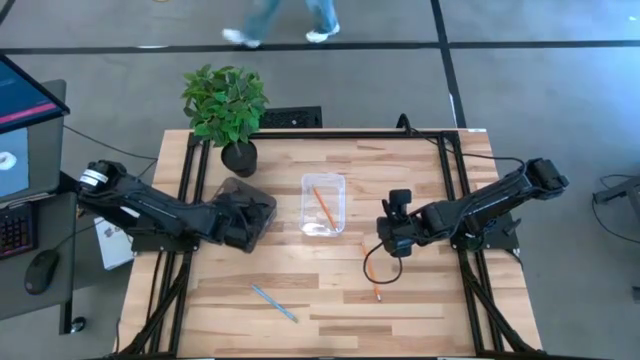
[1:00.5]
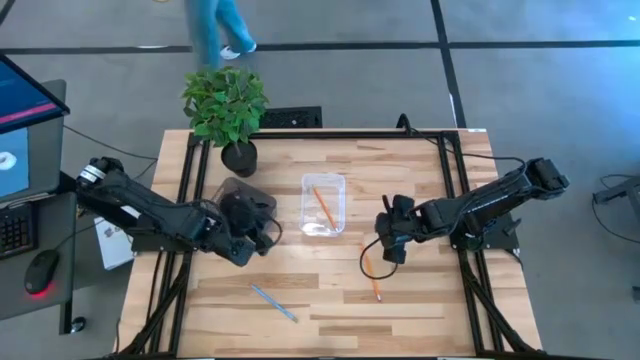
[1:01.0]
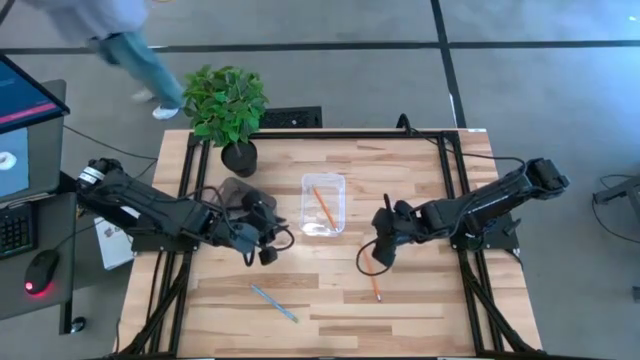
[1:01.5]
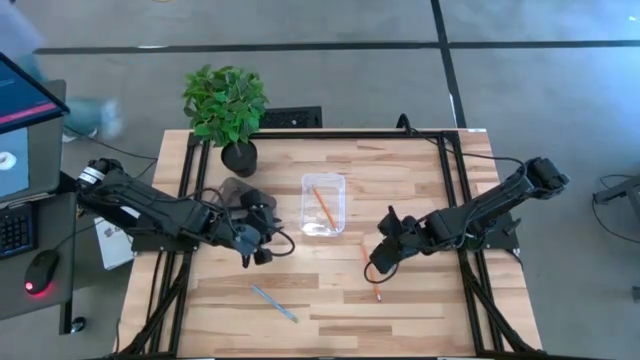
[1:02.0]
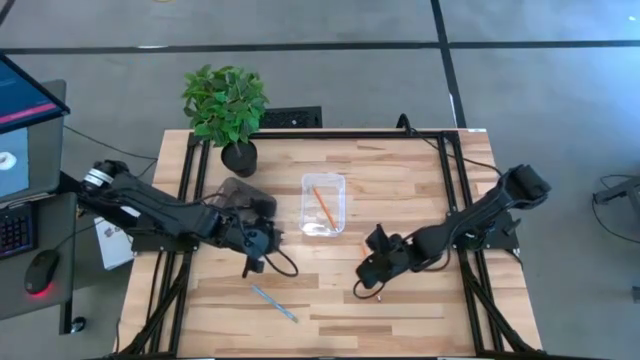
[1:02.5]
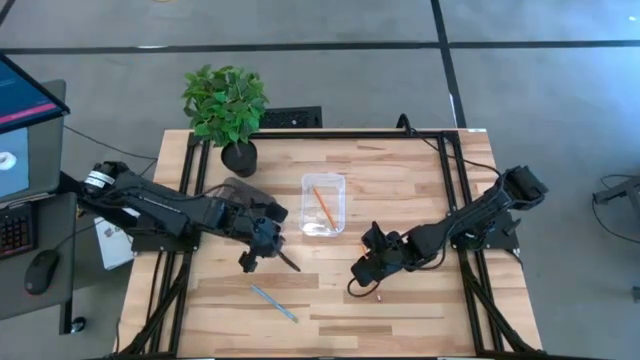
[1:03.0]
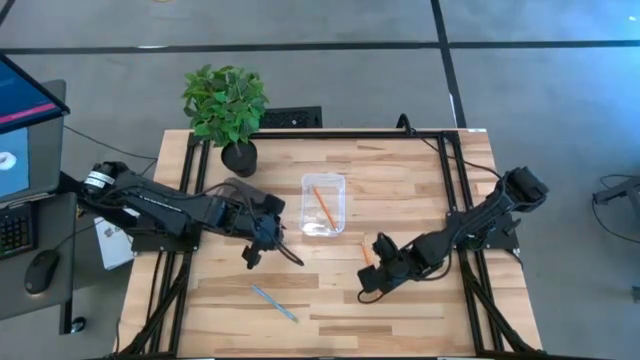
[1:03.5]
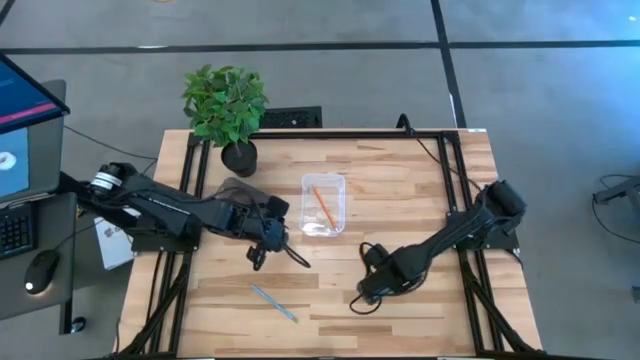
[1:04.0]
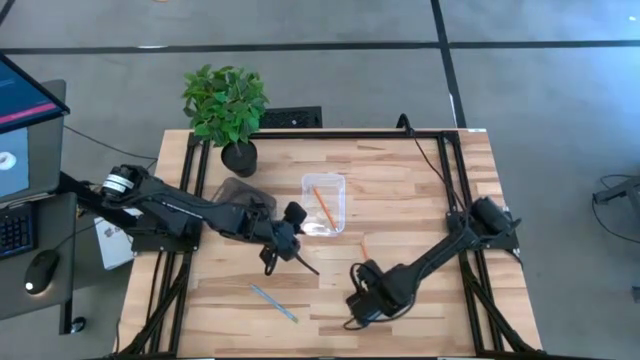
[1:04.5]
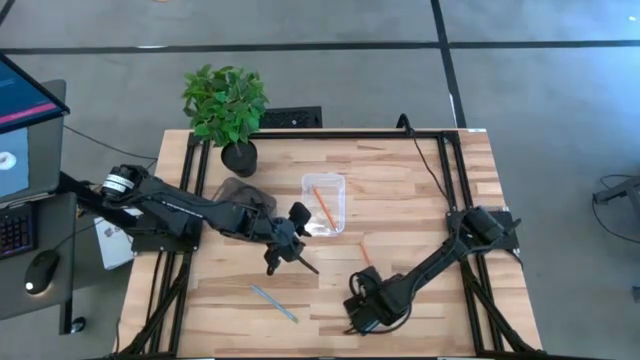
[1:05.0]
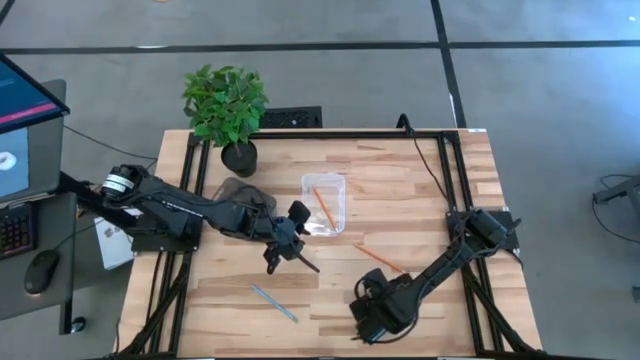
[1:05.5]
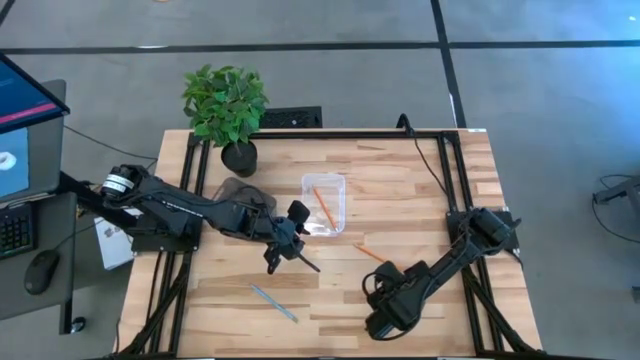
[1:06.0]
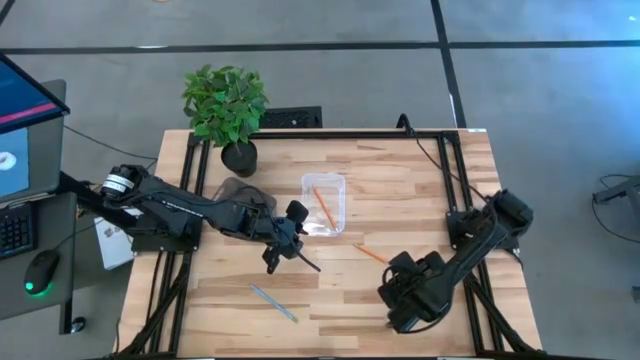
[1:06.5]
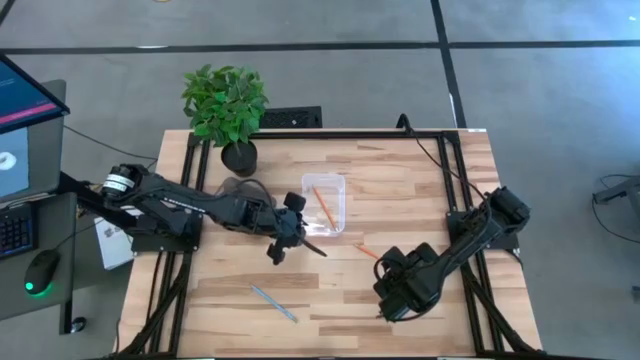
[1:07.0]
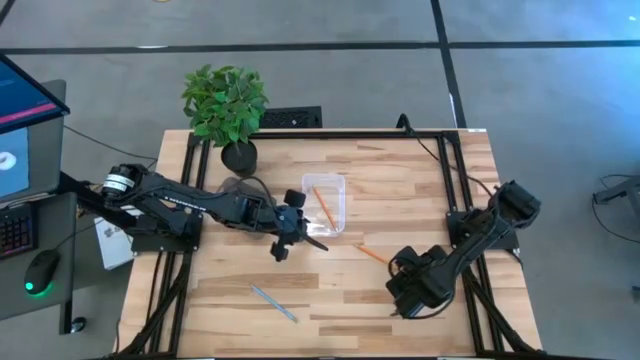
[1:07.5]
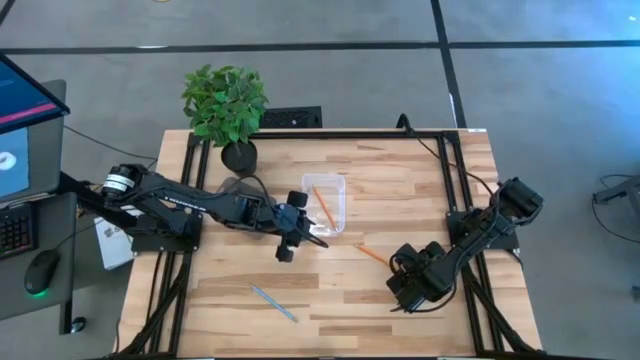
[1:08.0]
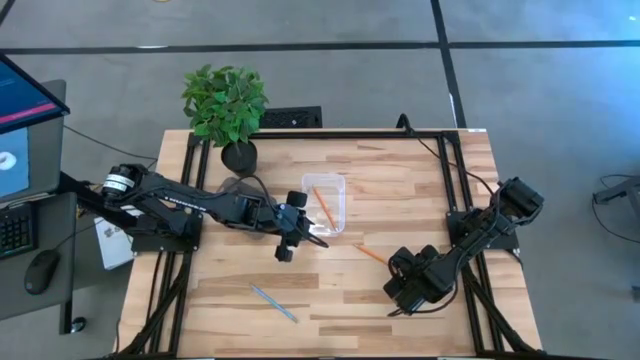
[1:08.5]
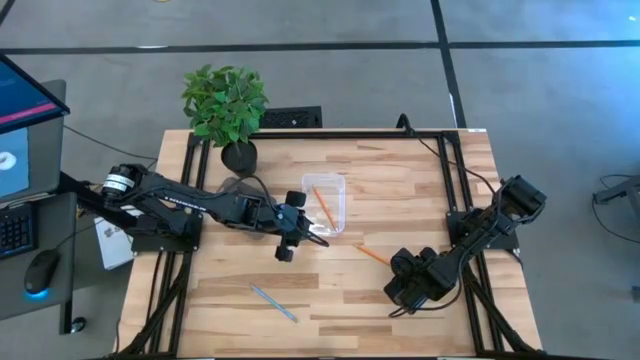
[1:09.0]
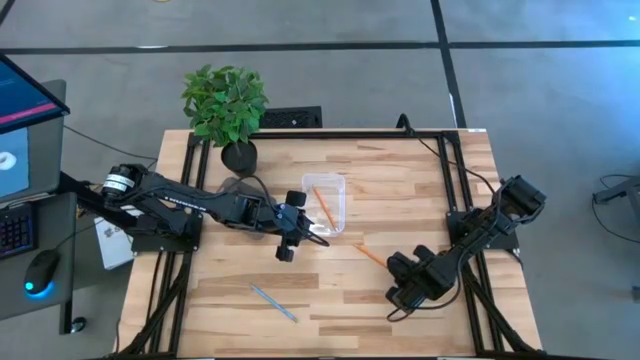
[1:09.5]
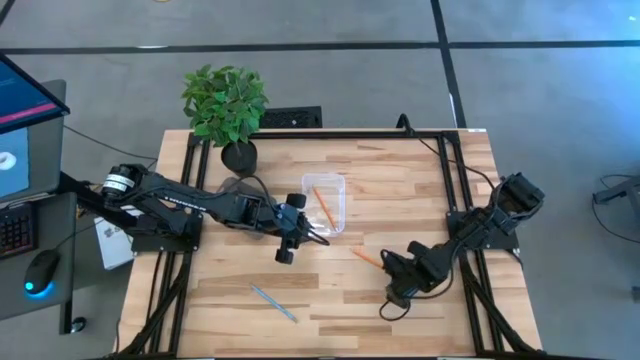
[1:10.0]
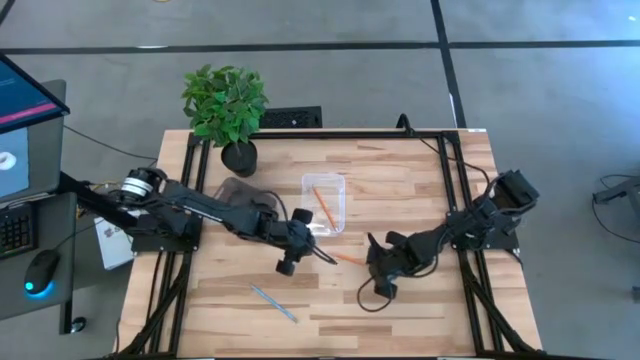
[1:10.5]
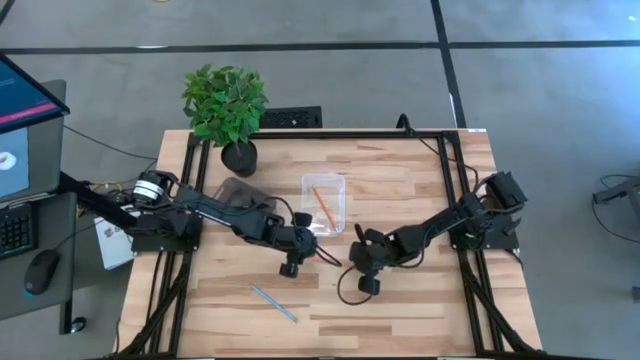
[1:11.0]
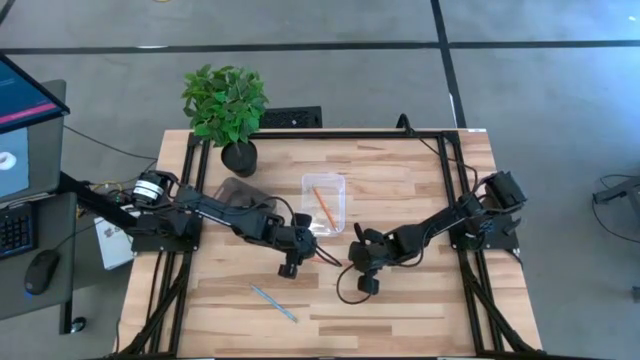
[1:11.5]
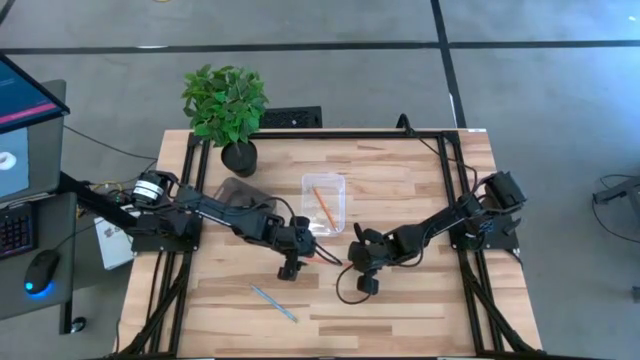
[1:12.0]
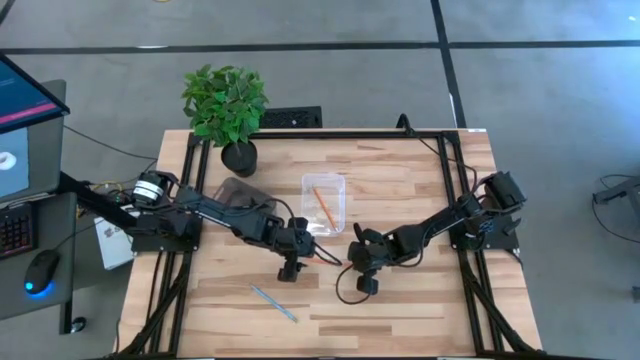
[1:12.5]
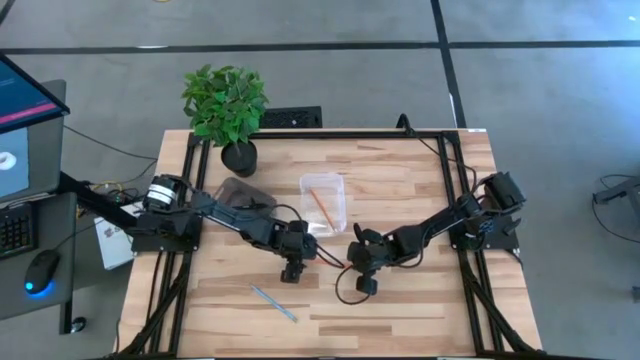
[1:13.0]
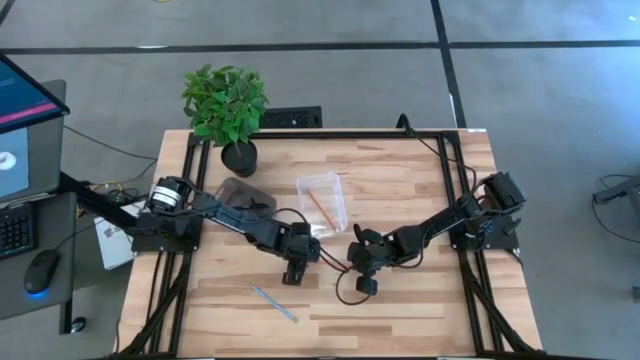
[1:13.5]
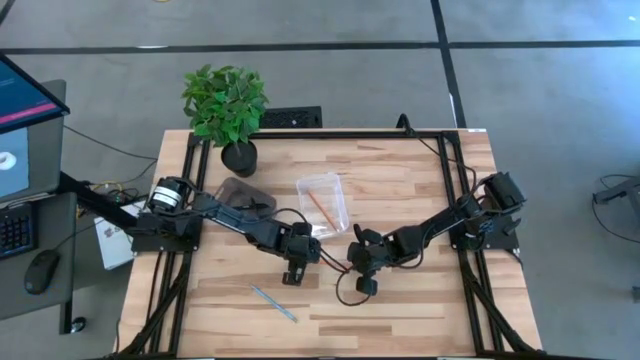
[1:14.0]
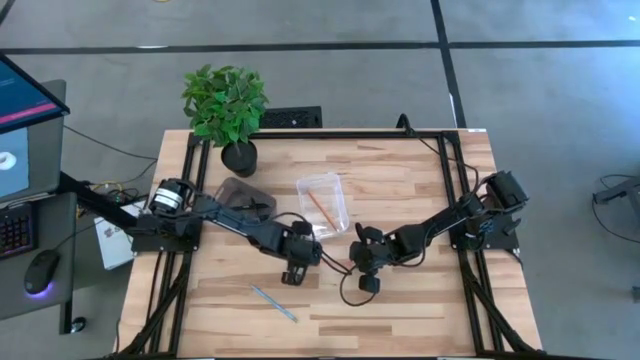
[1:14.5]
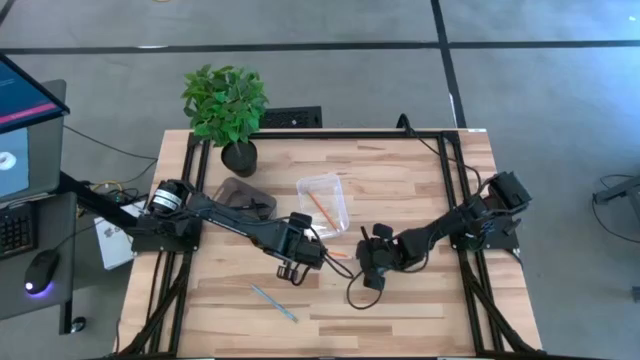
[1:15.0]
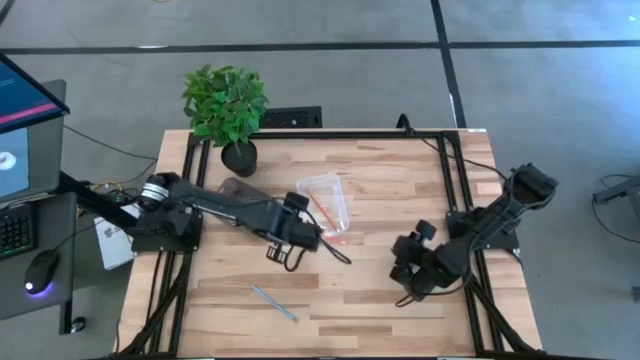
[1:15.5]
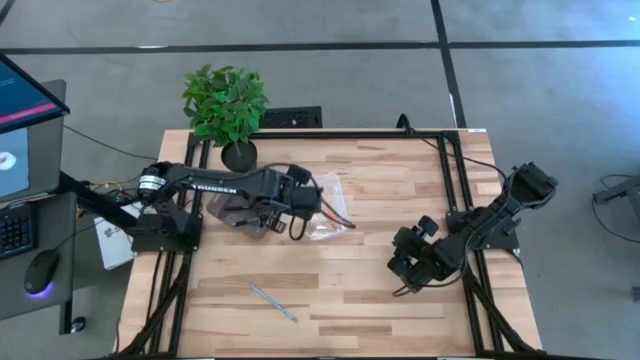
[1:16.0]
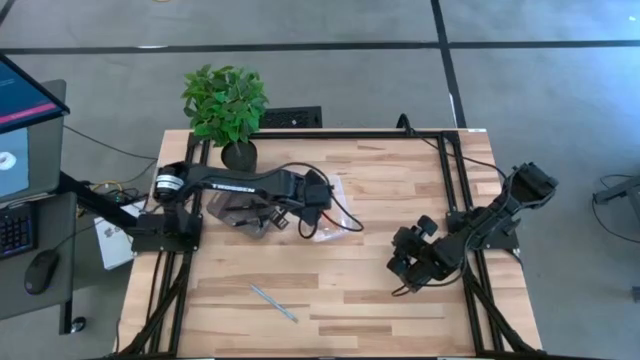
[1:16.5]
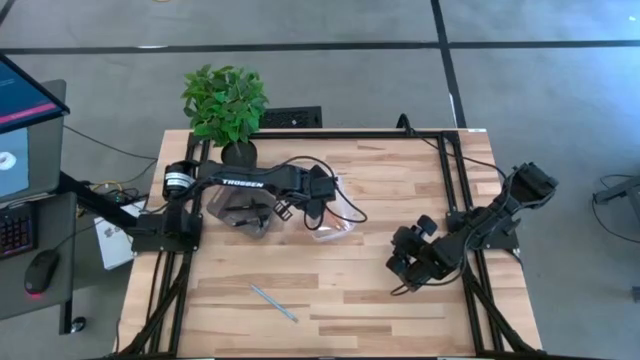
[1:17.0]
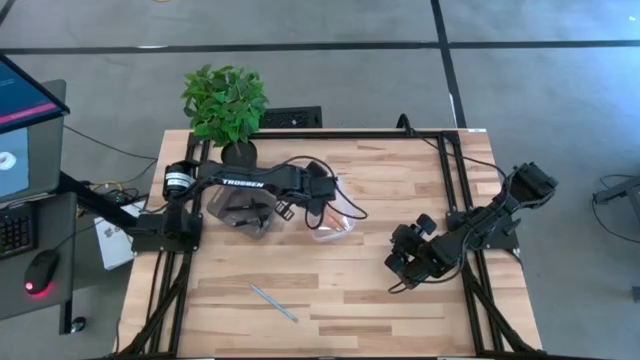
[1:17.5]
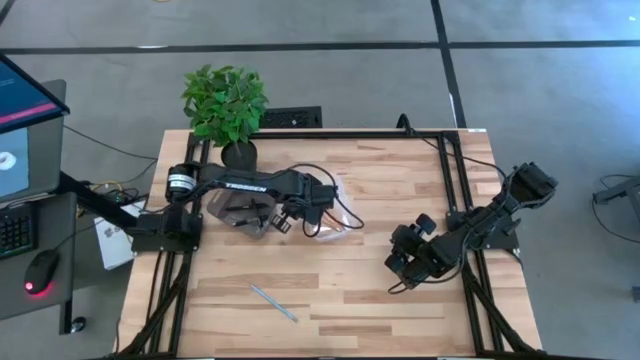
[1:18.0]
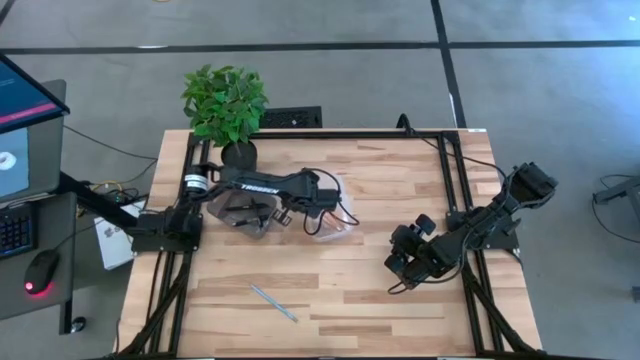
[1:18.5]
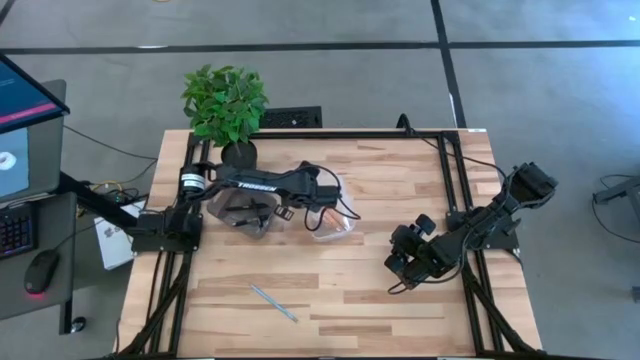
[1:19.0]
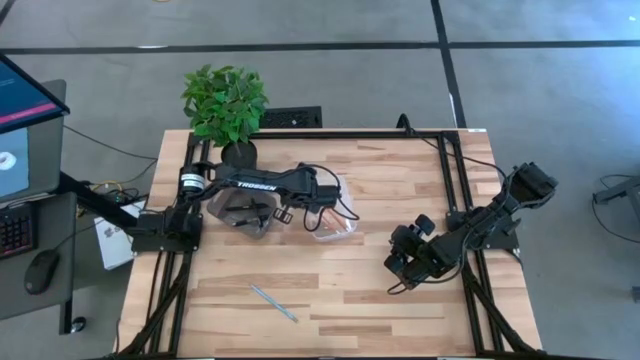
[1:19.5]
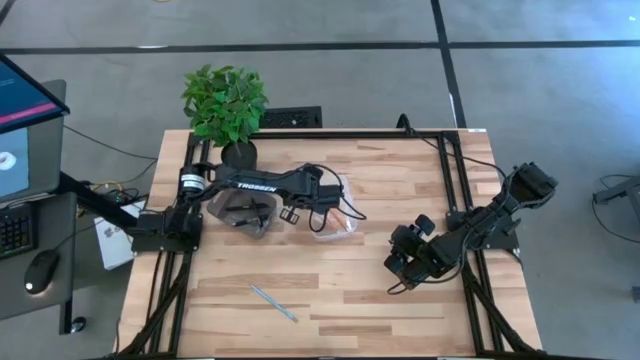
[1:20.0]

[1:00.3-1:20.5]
Task: Sort pens & pencils
Put the yellow pencil into the white bin

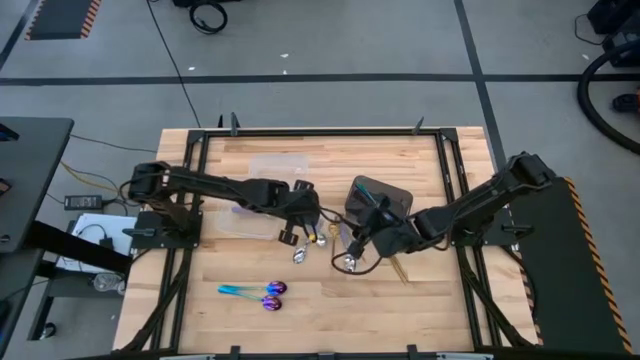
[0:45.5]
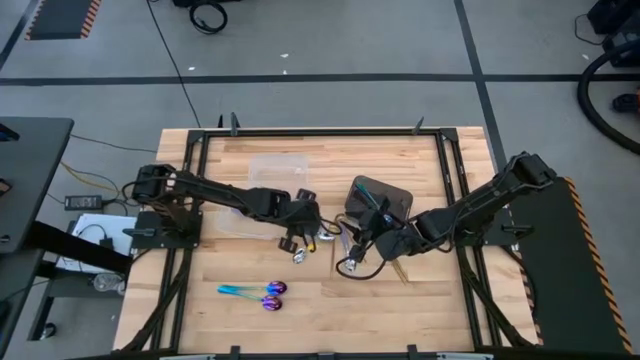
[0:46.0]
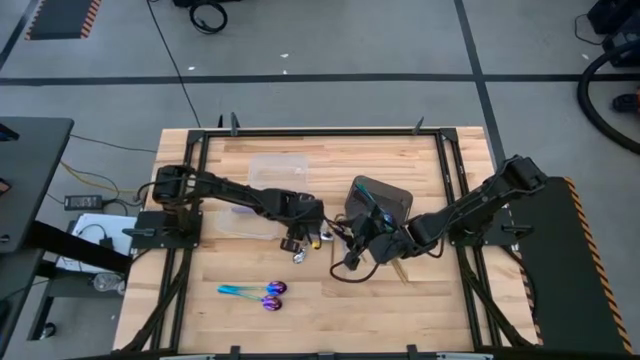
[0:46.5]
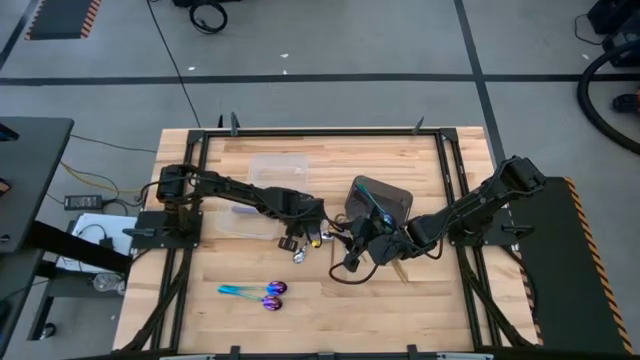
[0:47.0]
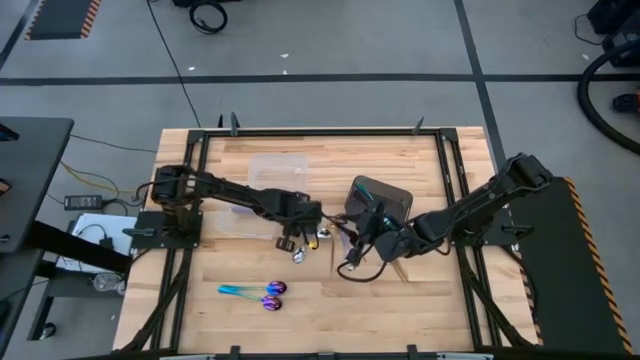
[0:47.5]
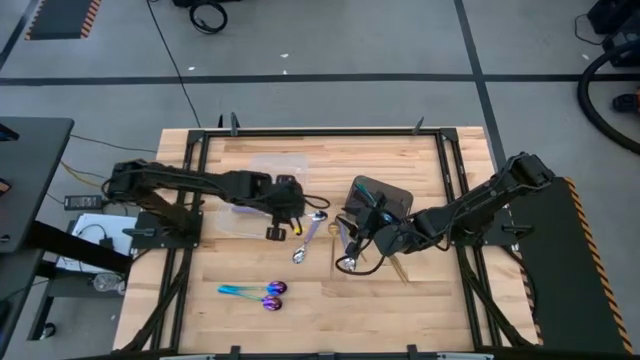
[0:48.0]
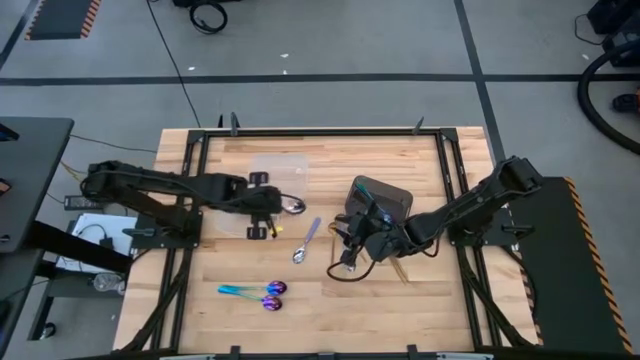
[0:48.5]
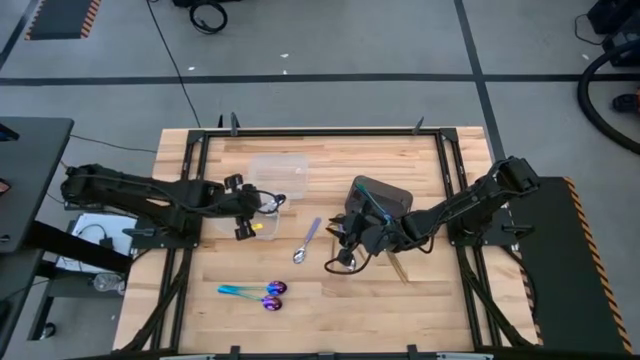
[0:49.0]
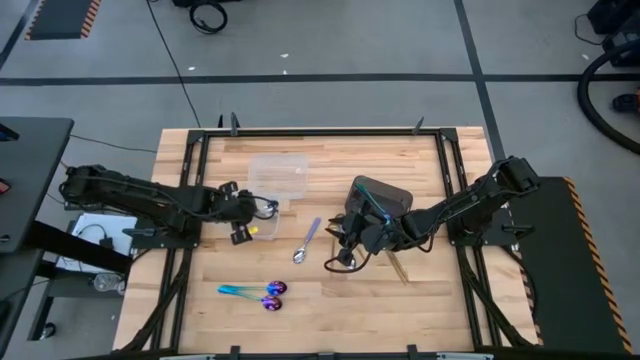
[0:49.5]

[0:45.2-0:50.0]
Task: Sort silverware by color (type)
Put the blue spoon into the bottom transparent bin
